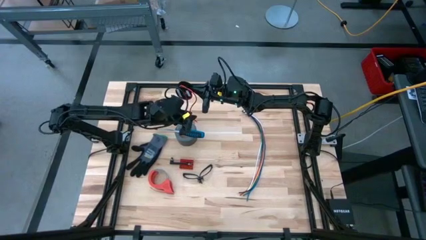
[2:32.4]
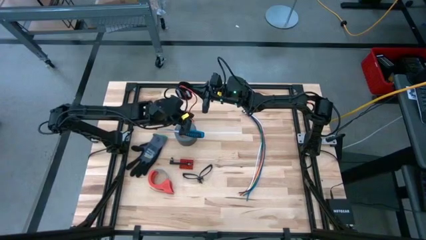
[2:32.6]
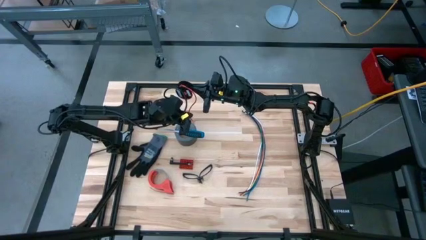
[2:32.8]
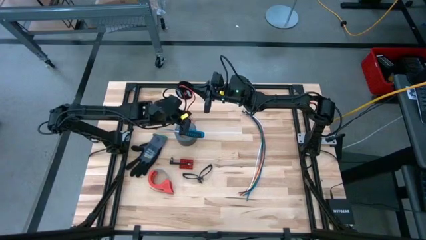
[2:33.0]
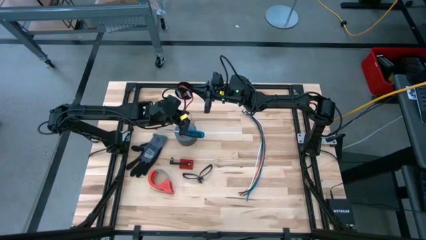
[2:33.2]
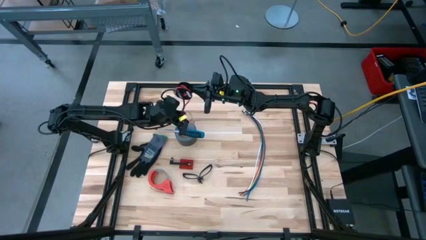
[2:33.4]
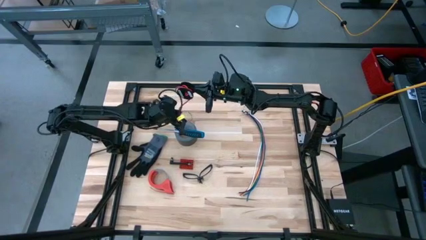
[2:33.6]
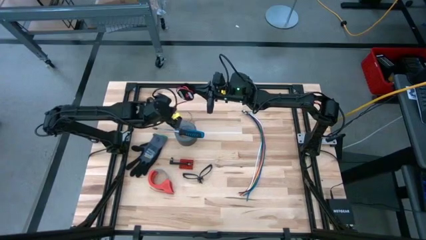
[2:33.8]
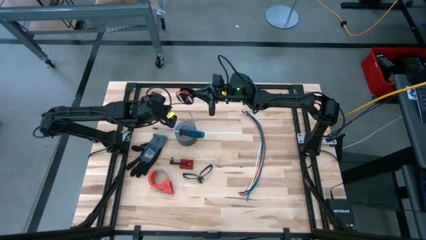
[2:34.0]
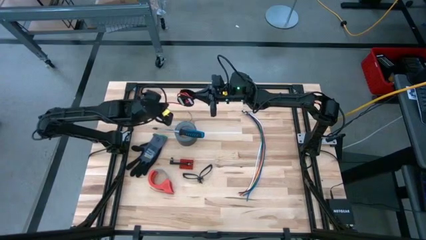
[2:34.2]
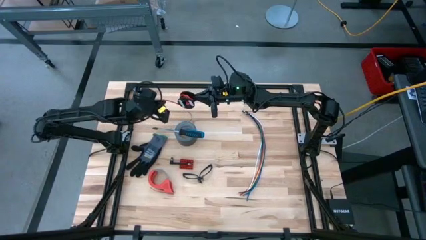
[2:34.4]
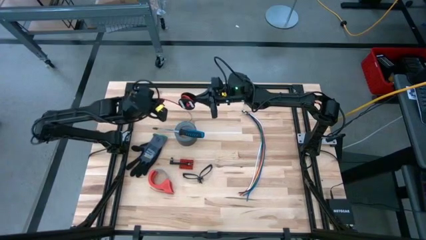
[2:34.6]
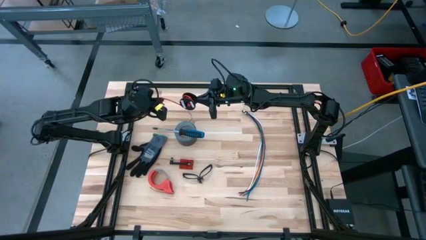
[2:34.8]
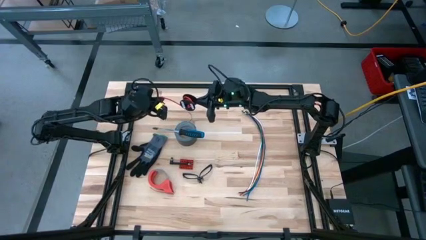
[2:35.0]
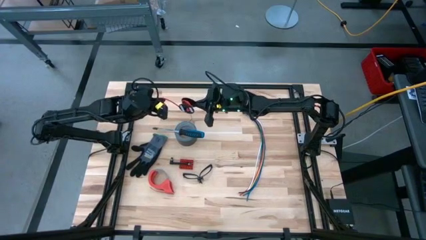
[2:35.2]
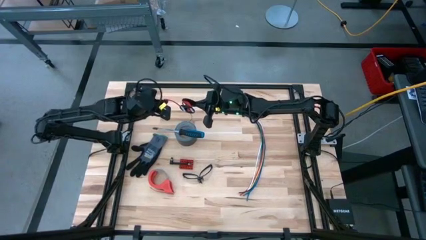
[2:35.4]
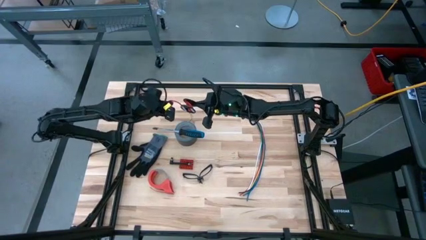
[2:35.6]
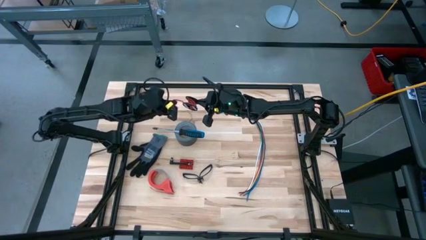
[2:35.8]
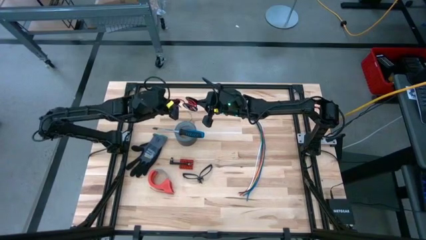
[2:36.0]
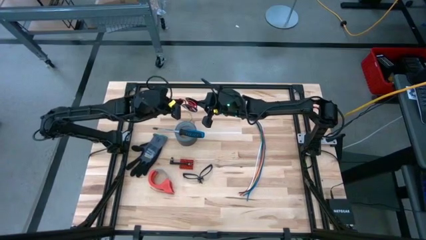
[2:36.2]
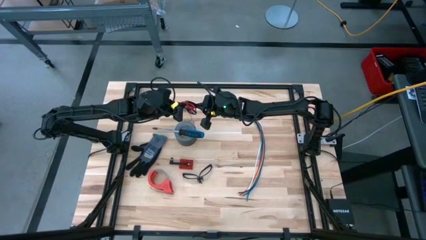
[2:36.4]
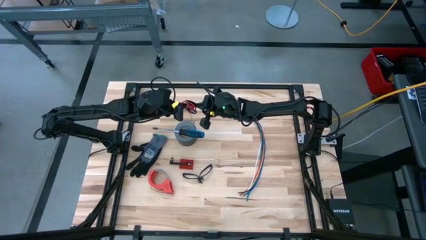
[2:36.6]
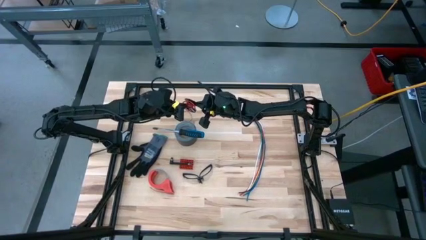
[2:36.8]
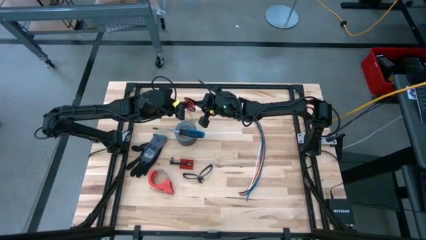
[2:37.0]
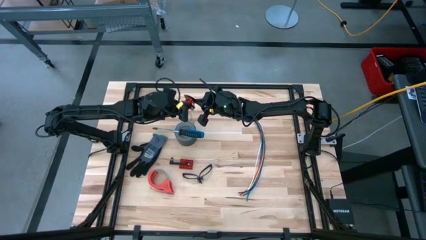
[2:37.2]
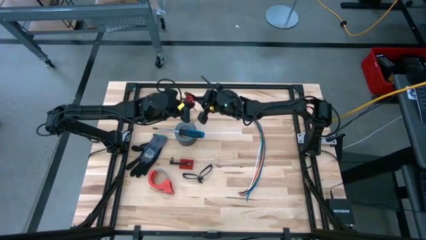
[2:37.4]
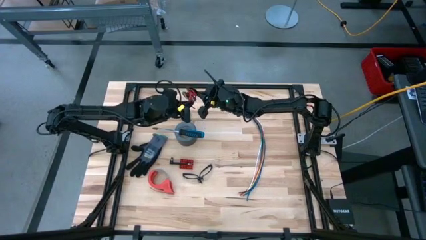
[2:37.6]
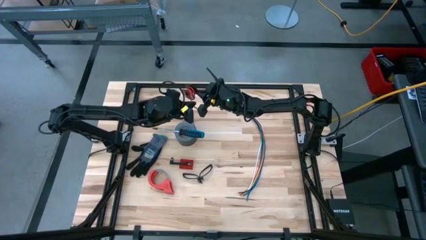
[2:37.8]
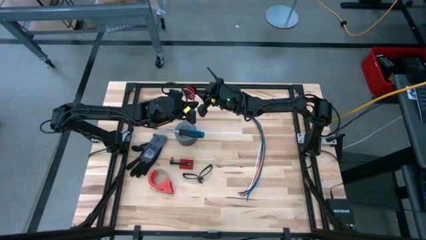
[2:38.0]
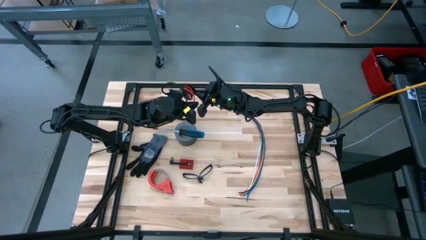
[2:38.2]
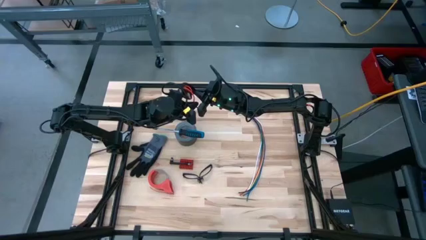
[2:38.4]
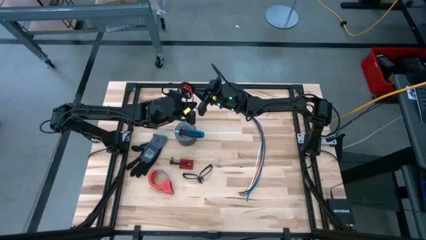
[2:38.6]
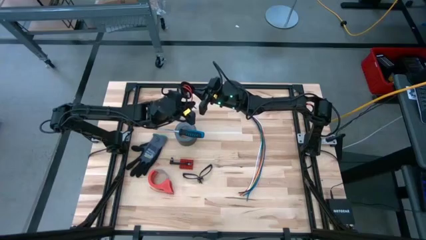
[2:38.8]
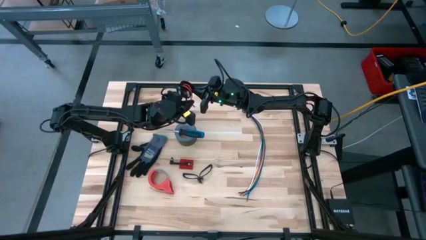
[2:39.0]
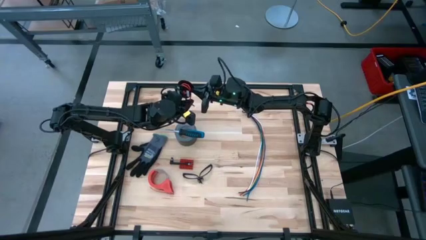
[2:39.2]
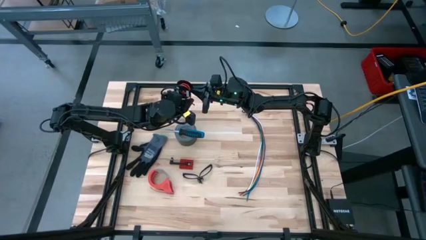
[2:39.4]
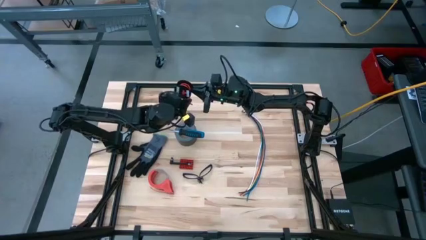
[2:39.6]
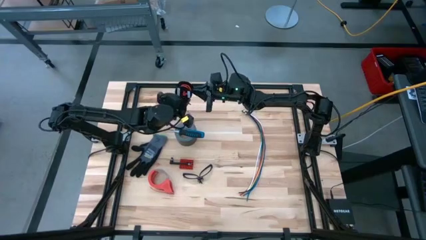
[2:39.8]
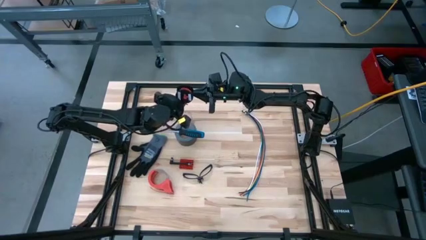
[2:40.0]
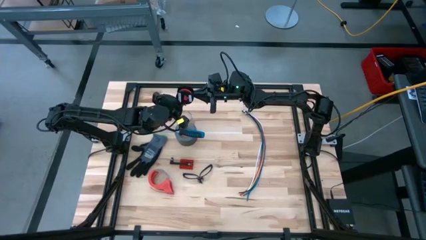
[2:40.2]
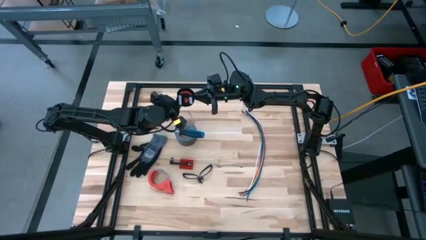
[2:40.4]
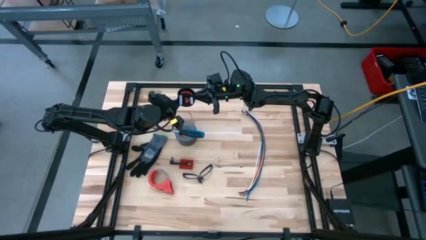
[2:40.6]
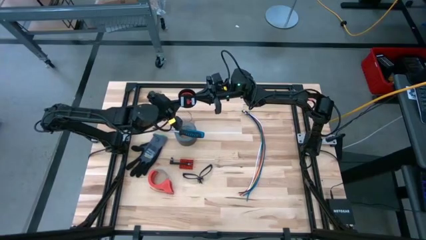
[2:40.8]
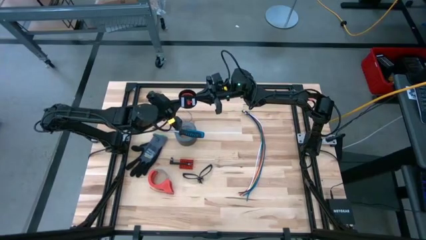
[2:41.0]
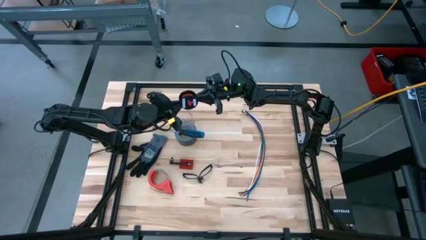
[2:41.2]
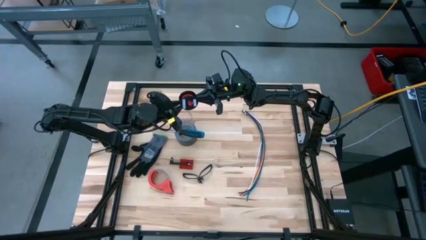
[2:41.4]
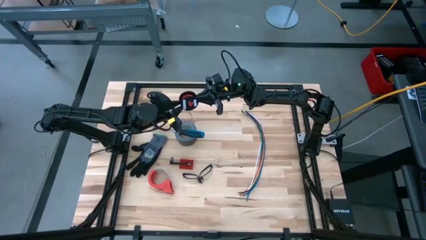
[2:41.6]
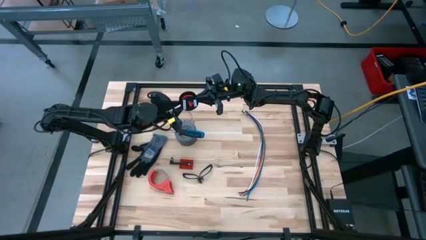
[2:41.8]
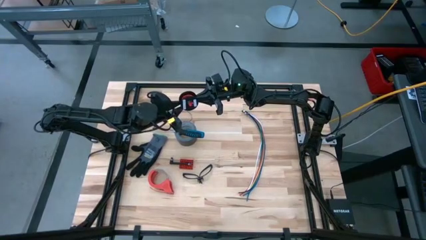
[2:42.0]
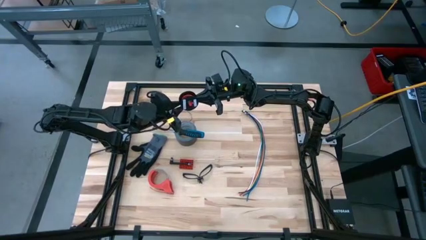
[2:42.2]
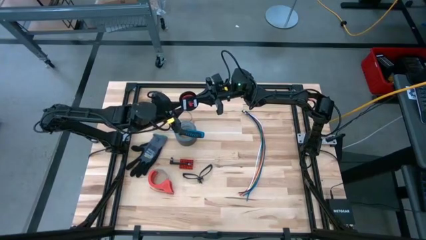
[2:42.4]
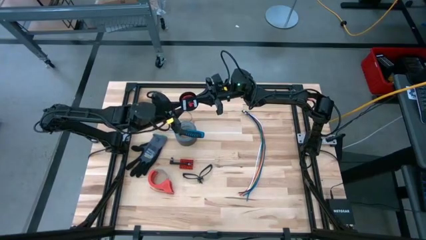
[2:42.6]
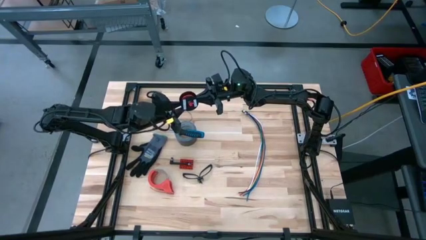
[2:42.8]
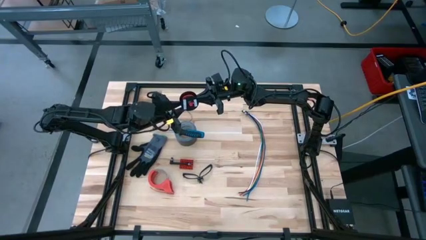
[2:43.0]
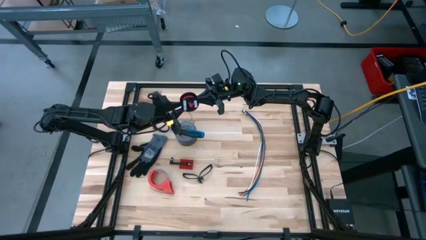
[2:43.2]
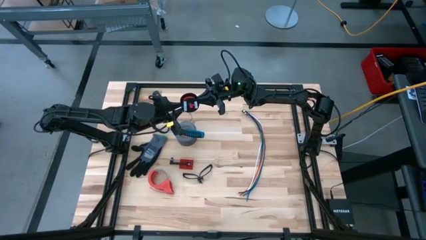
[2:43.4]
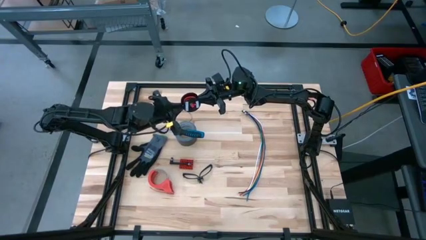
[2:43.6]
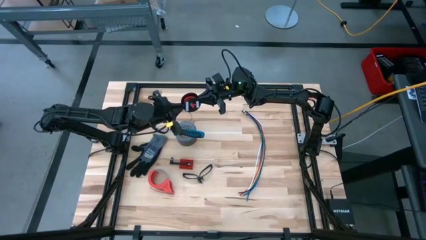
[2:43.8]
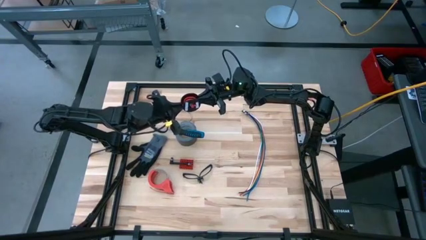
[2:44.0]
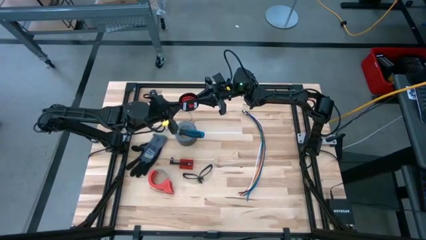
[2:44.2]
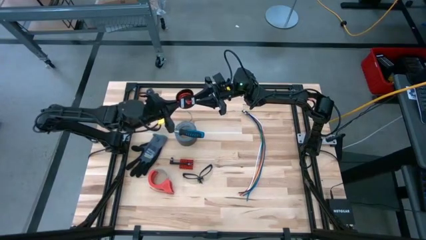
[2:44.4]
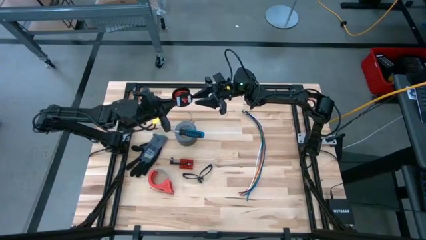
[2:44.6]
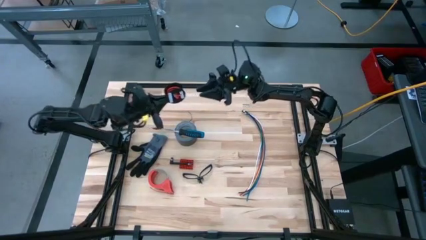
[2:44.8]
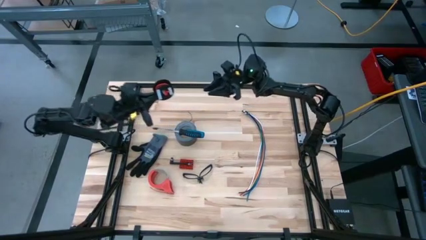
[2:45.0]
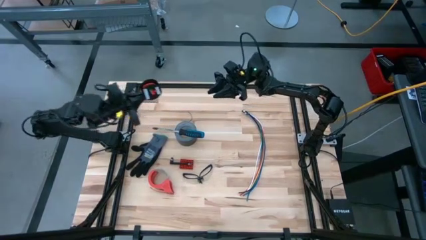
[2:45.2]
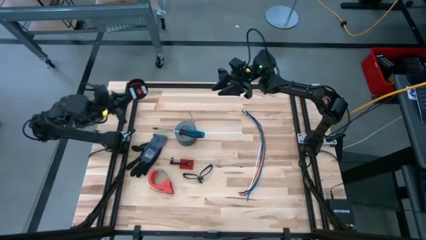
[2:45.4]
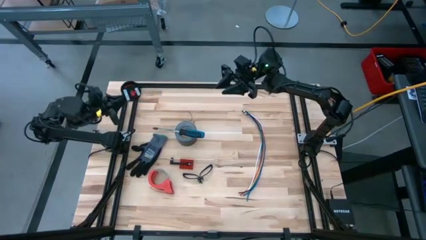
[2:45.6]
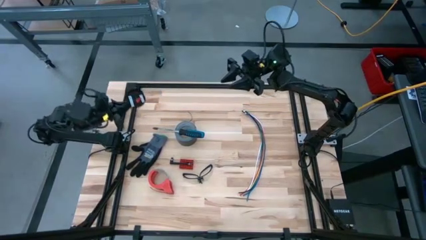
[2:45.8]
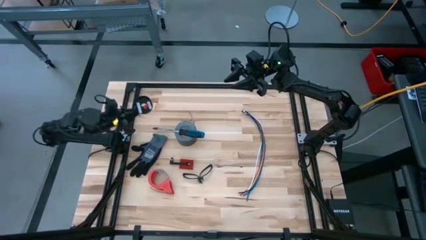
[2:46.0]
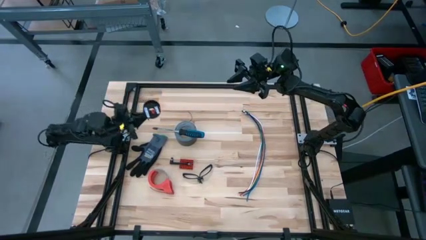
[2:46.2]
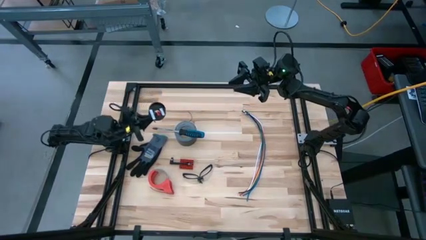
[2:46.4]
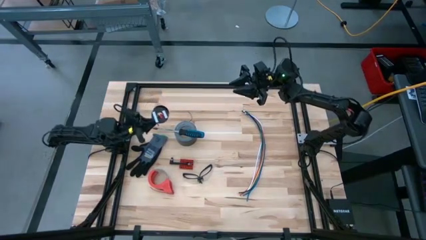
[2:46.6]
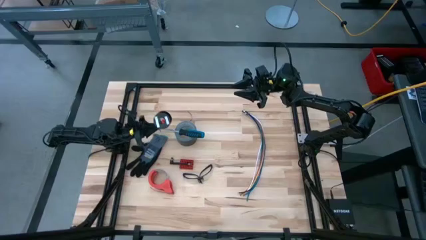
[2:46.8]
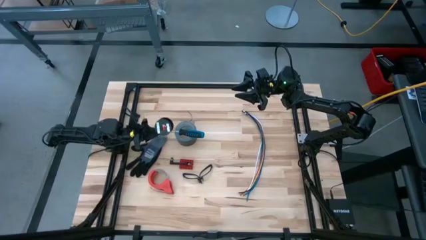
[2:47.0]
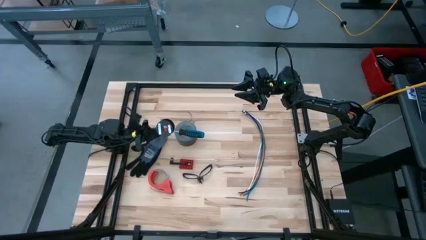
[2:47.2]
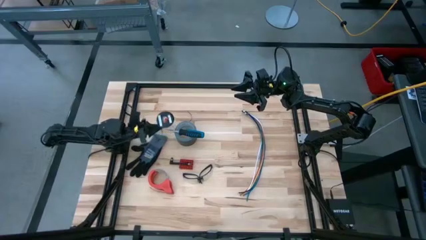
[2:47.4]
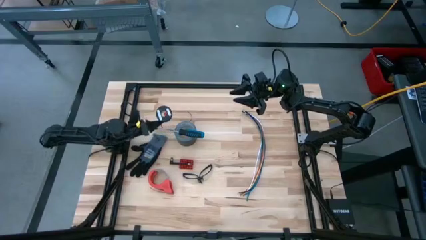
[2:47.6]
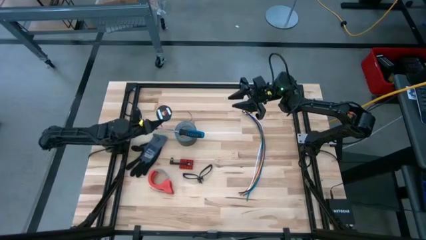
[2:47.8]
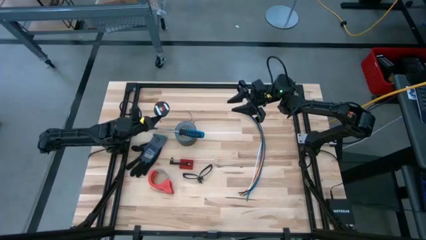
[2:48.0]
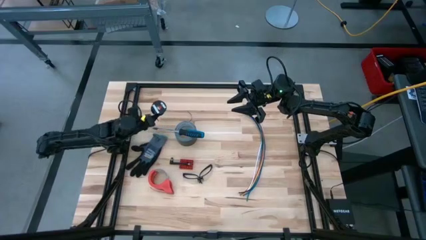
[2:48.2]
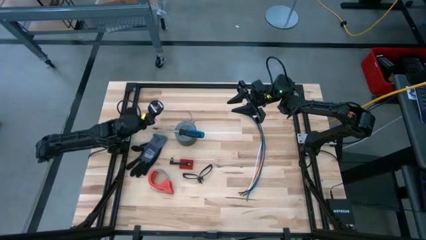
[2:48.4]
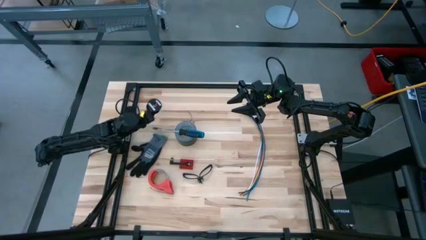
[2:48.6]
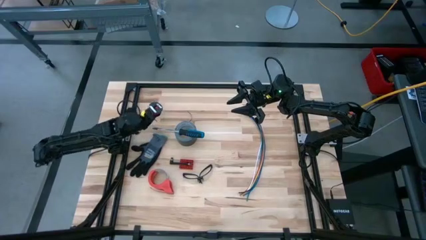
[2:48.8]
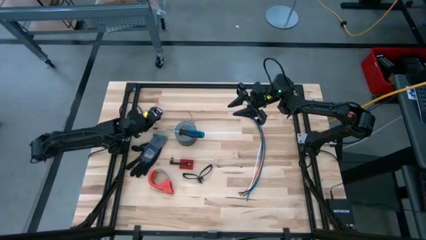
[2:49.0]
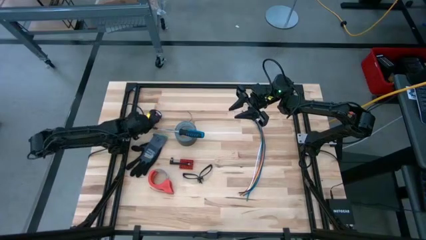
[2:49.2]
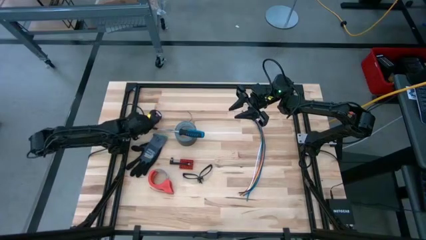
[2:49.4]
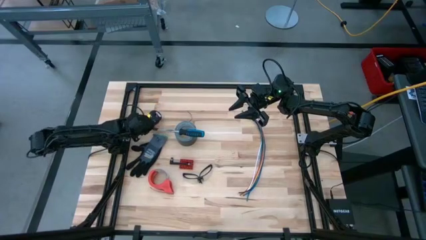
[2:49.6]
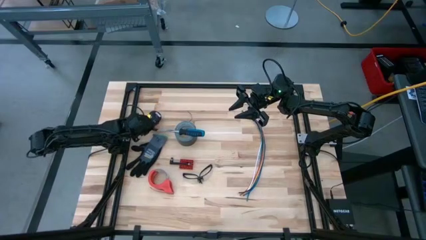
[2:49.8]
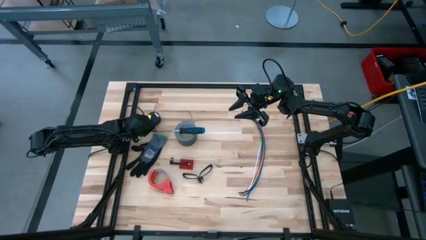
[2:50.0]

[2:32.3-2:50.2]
Task: Coil cords
Coil the red wire into the black spool
